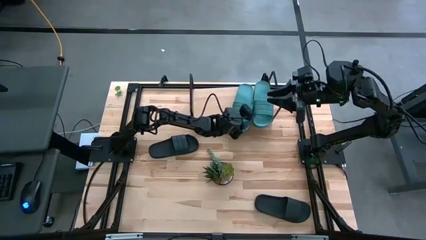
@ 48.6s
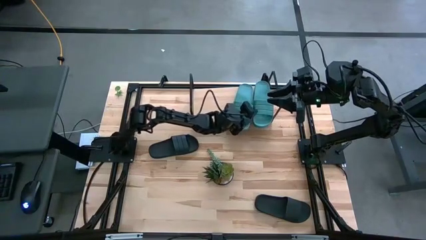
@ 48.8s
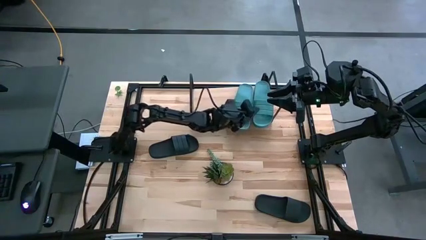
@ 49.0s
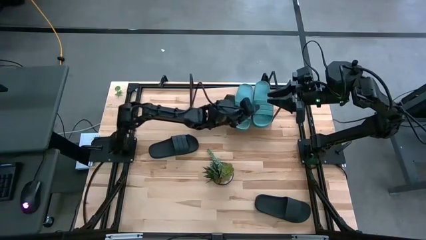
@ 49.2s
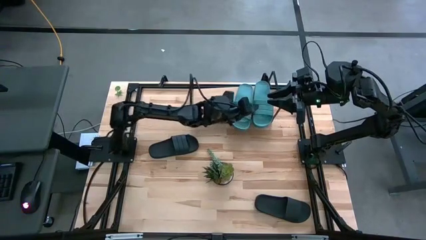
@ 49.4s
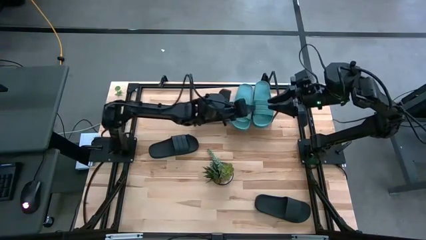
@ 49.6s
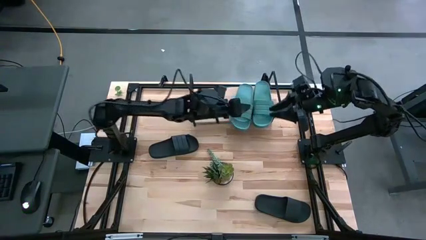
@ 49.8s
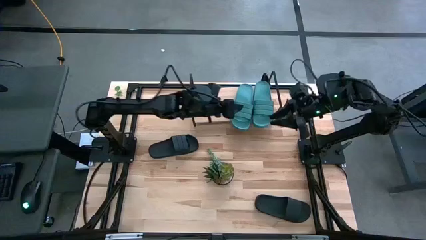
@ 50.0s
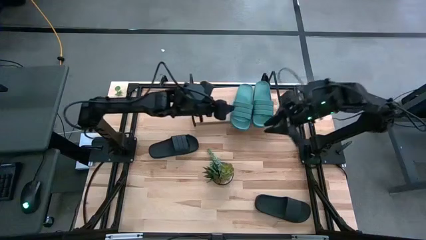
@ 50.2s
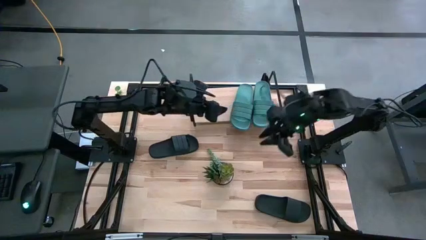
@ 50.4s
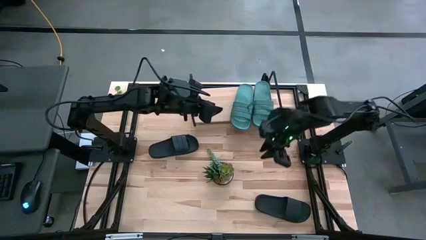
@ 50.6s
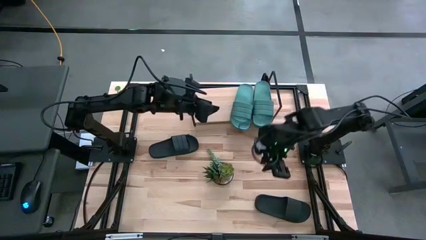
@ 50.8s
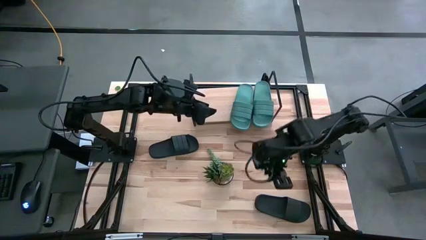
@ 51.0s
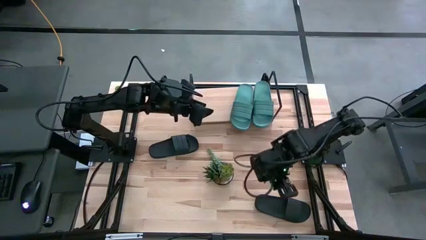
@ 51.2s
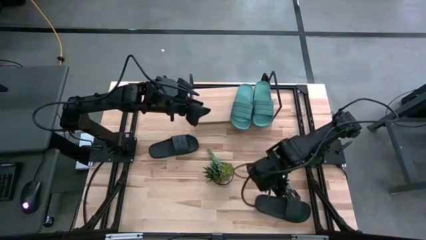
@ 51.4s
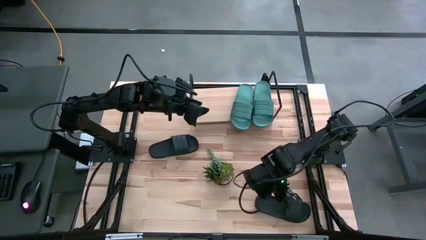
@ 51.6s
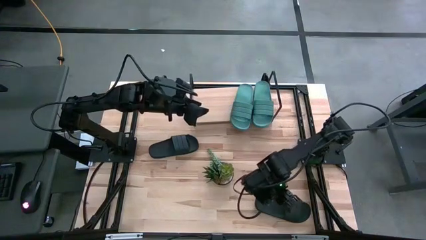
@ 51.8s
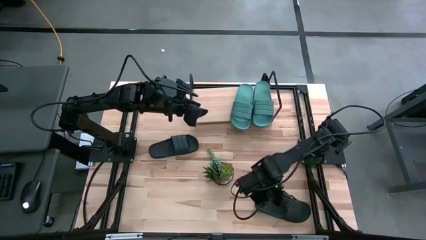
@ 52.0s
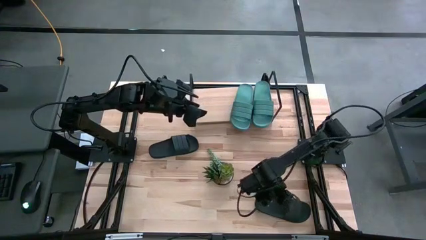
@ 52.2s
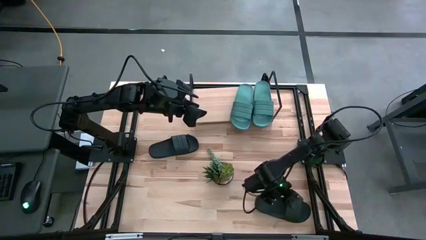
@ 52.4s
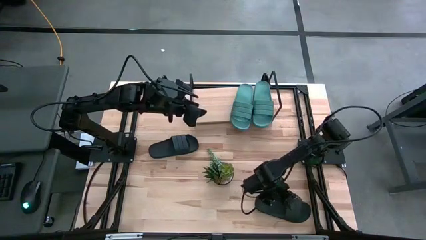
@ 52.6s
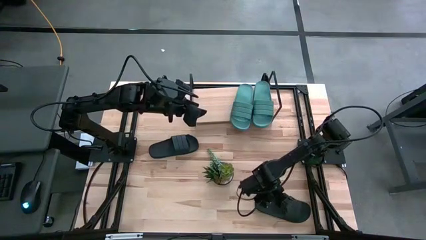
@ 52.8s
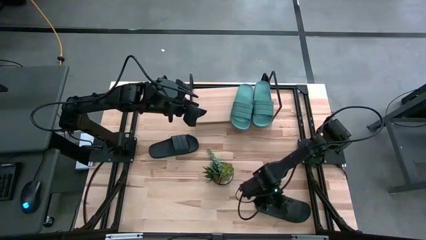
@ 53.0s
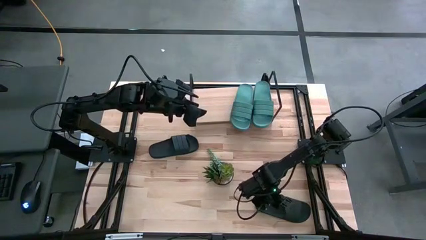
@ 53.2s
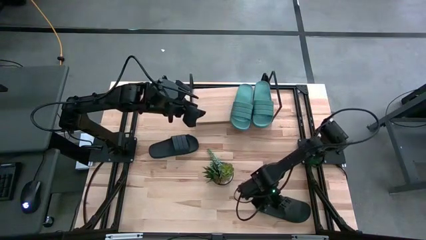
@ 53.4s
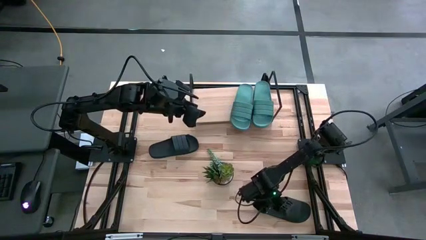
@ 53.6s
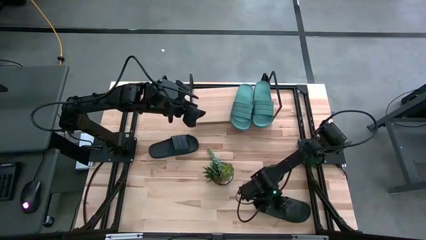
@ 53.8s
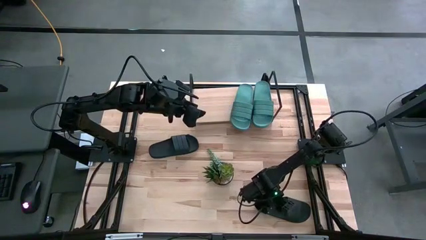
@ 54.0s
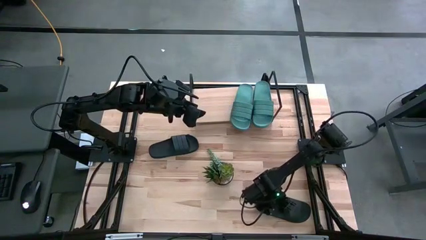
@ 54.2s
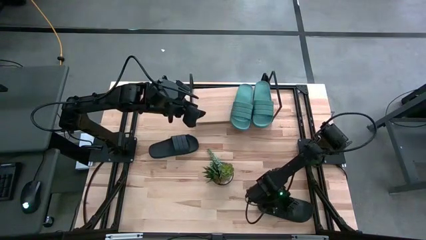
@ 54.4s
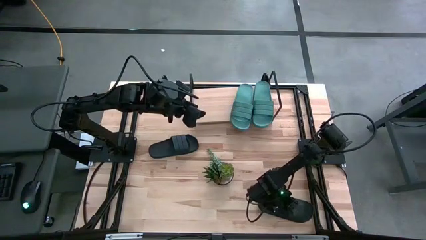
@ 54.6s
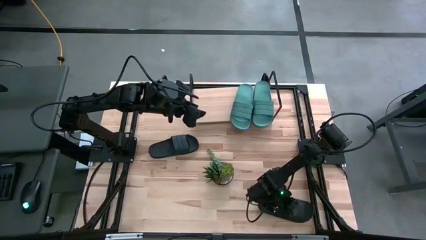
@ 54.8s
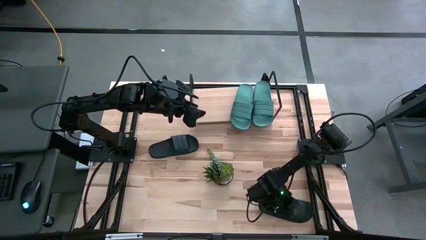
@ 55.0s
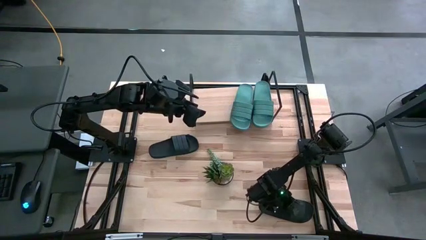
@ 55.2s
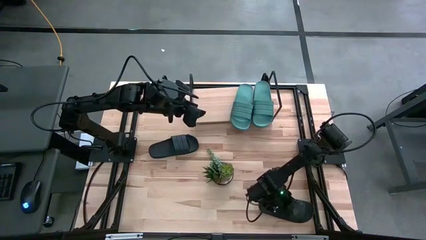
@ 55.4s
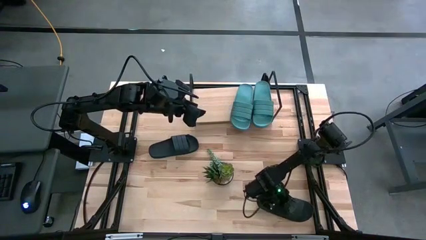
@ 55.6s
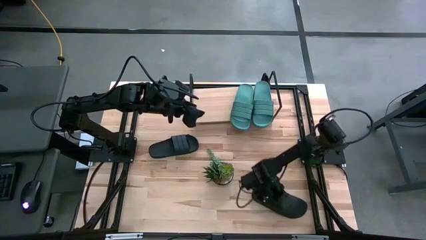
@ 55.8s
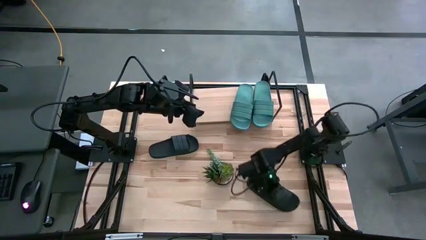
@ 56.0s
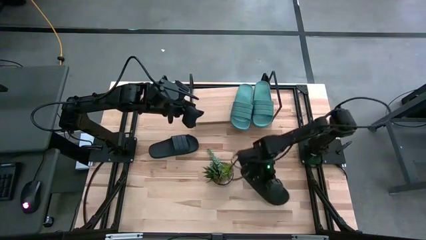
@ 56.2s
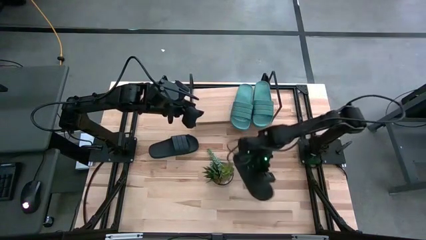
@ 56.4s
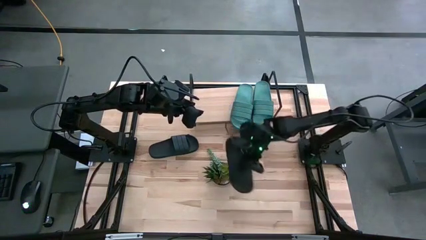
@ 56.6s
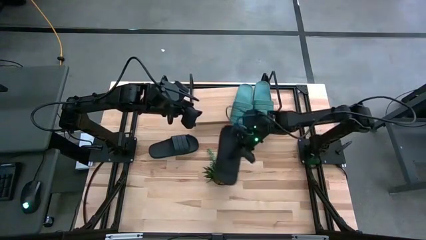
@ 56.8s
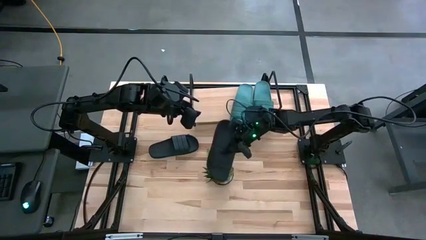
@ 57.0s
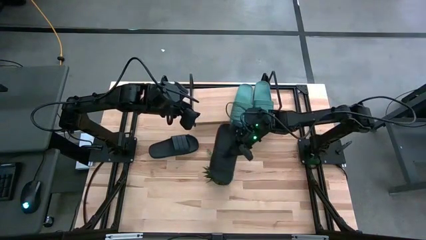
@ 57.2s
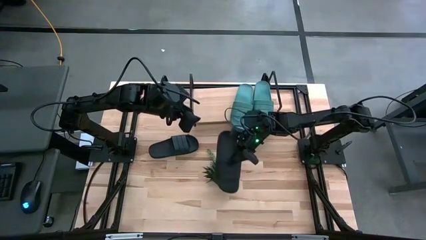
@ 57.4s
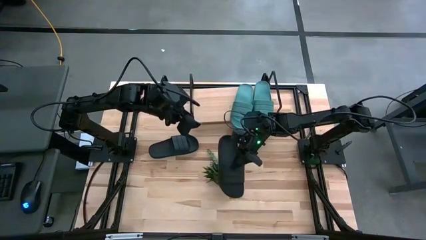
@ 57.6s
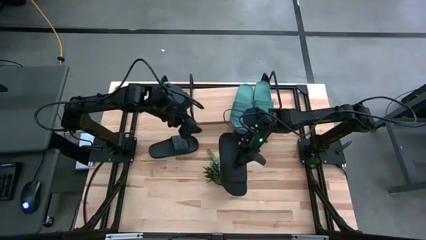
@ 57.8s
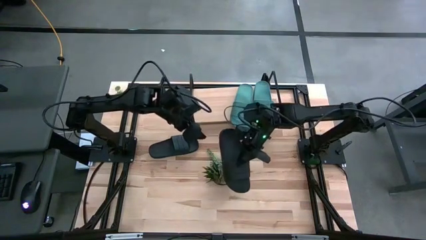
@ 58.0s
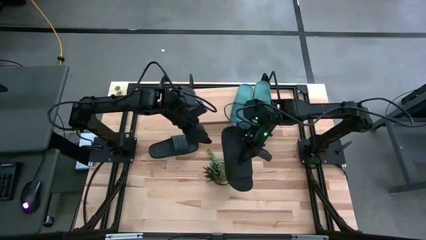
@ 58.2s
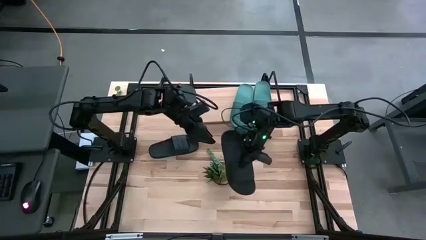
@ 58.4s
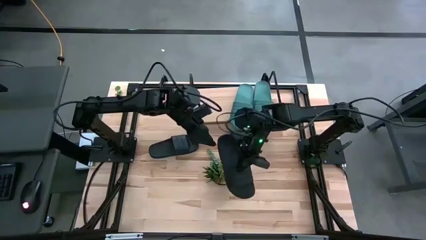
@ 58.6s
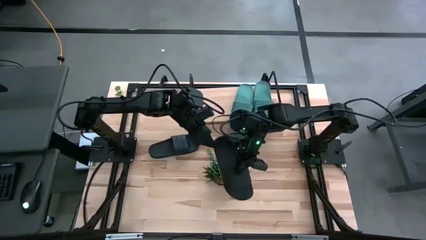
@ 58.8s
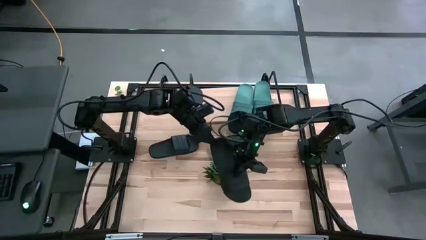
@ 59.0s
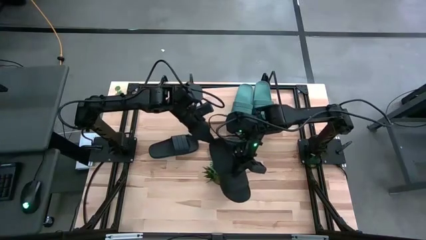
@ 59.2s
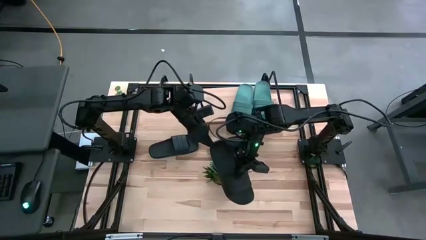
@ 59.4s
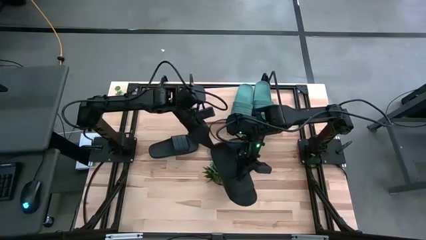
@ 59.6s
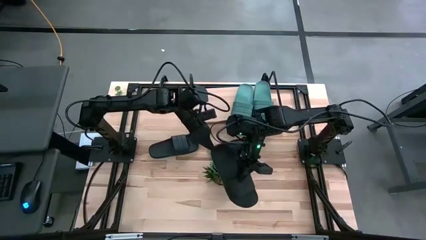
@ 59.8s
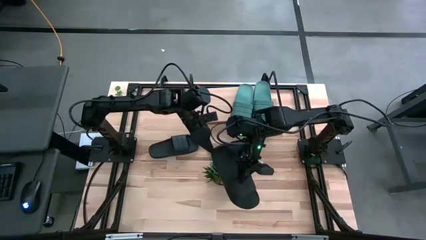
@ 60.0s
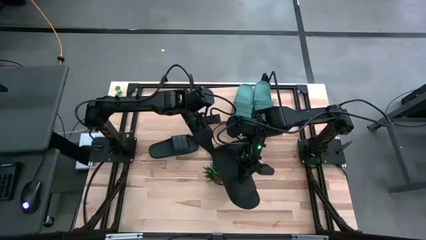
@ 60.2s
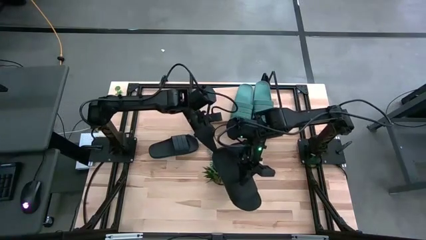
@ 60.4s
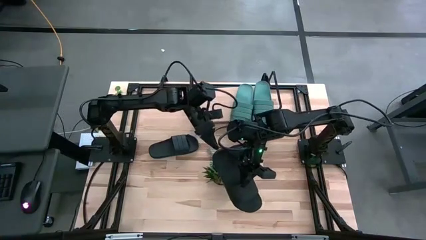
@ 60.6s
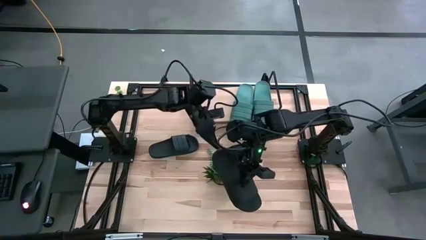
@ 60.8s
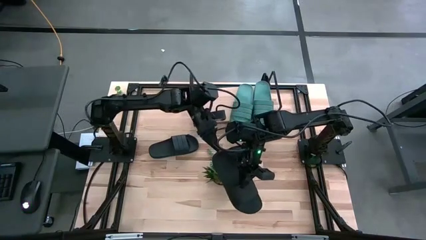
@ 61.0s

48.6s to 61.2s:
Task: Pick and place slides into the shelf
Put the right black slipper on the shelf

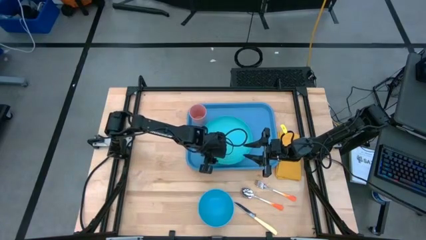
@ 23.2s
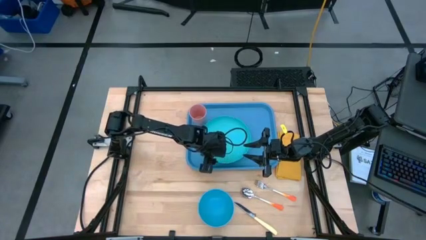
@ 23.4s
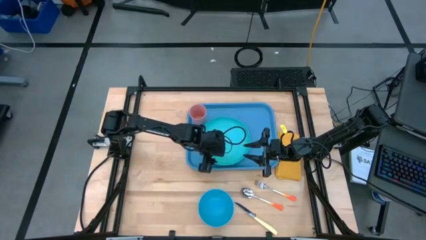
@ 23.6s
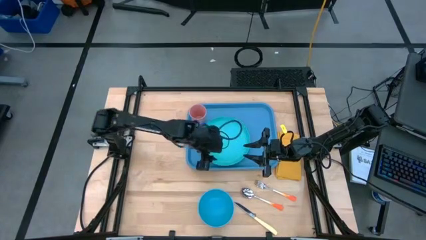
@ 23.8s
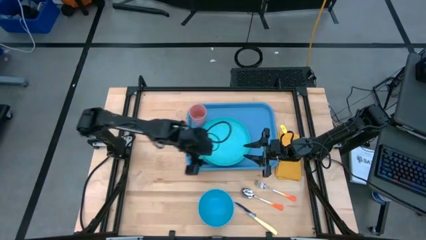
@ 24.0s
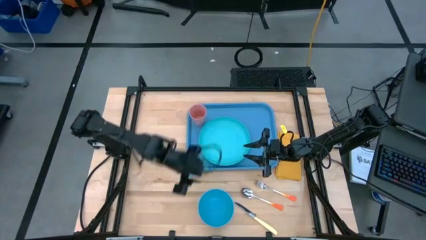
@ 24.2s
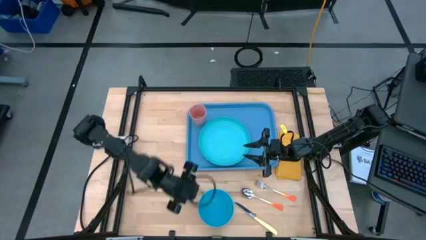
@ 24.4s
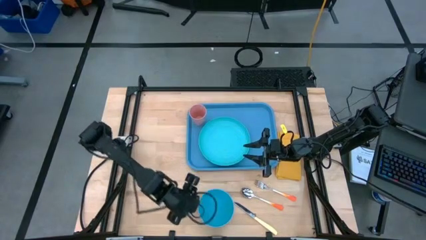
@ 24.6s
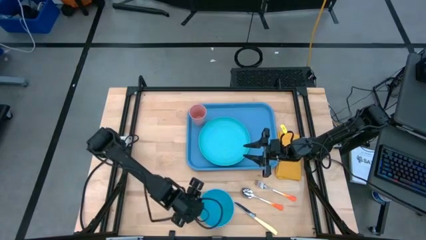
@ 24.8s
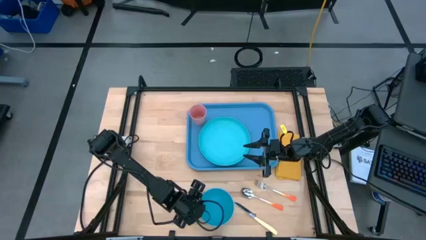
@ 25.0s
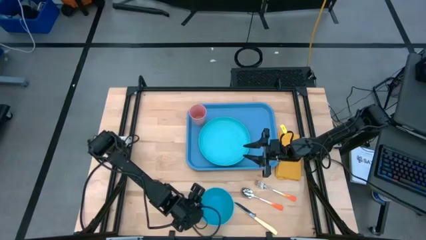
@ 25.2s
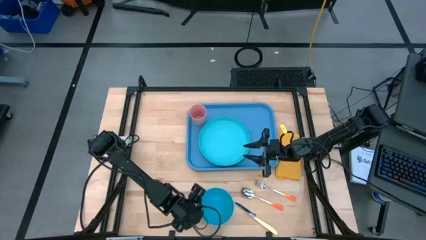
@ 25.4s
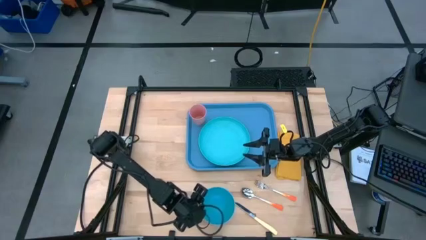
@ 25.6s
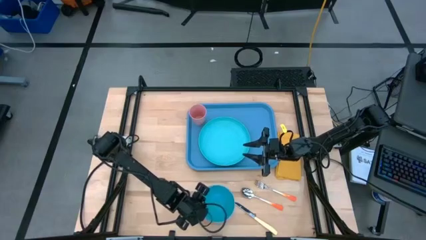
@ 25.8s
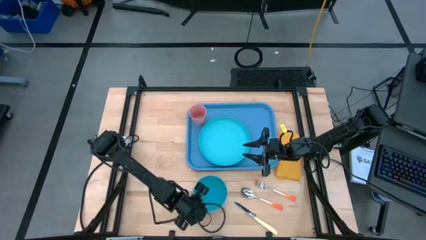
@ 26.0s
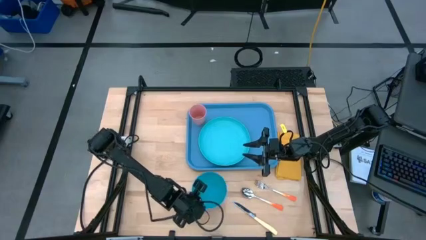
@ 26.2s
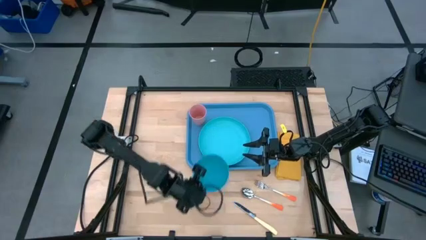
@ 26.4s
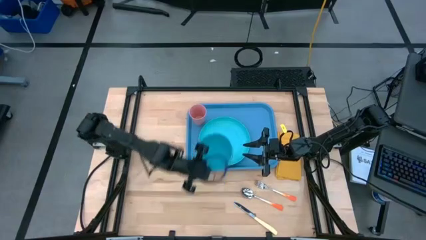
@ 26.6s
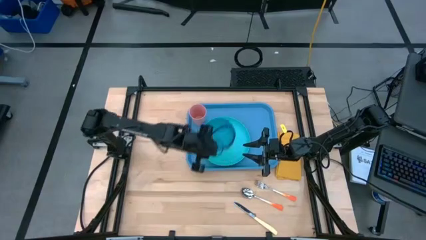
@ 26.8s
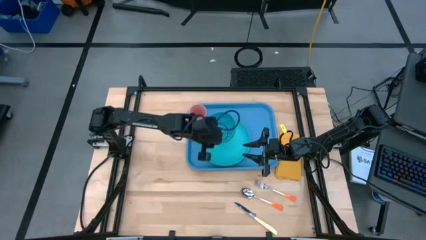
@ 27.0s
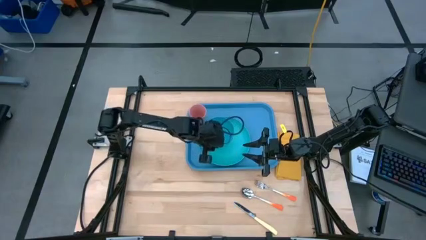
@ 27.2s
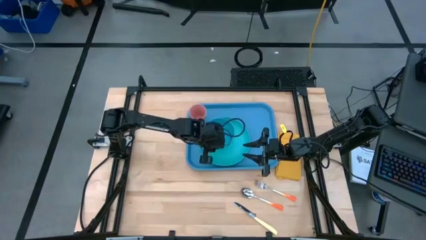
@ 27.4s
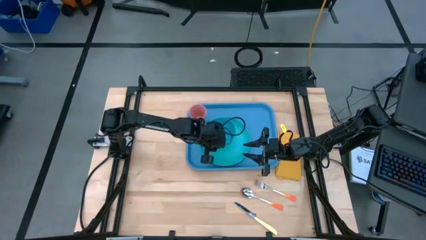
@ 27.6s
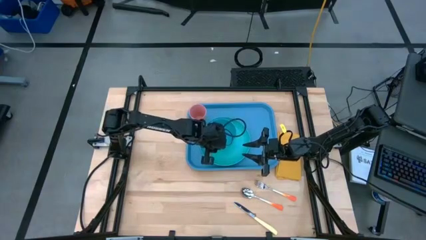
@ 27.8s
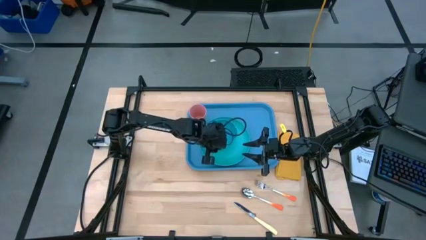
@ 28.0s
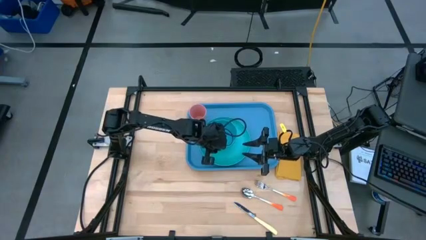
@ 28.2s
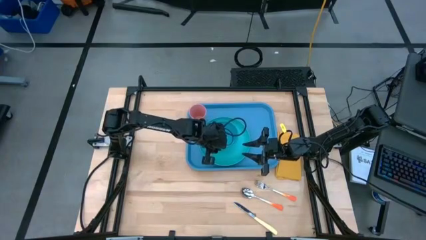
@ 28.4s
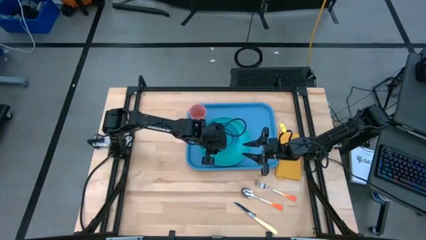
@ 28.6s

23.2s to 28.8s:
Task: Set up tray
Put the blue bowl on top of the green plate on the blue serving tray
